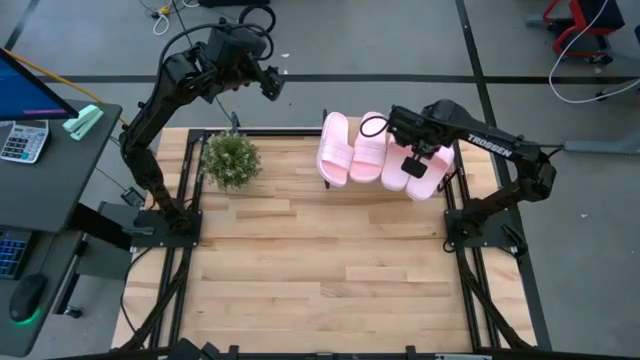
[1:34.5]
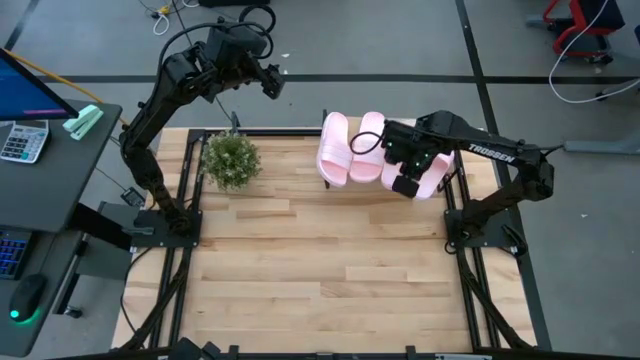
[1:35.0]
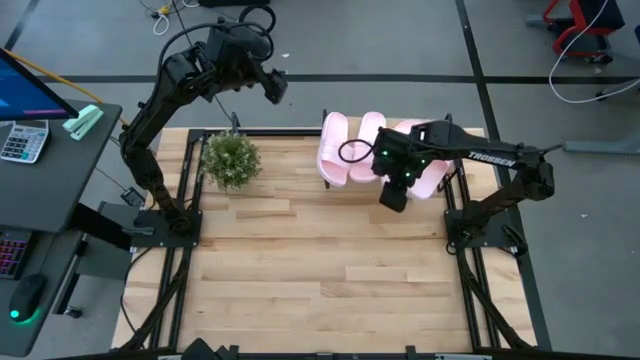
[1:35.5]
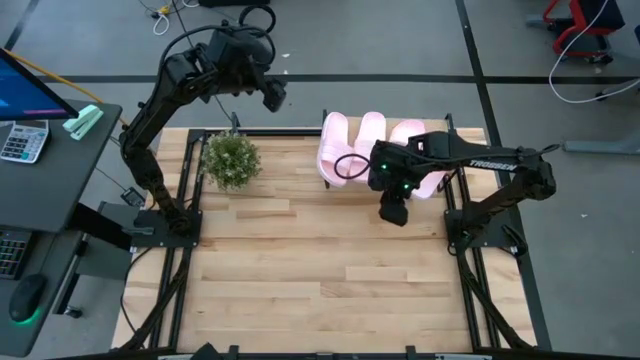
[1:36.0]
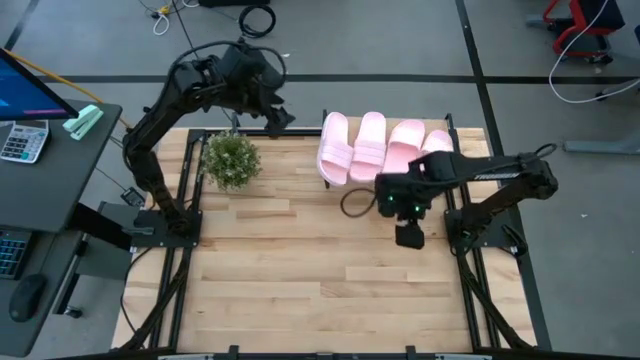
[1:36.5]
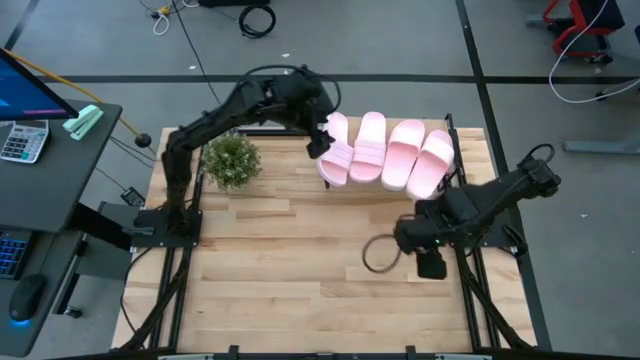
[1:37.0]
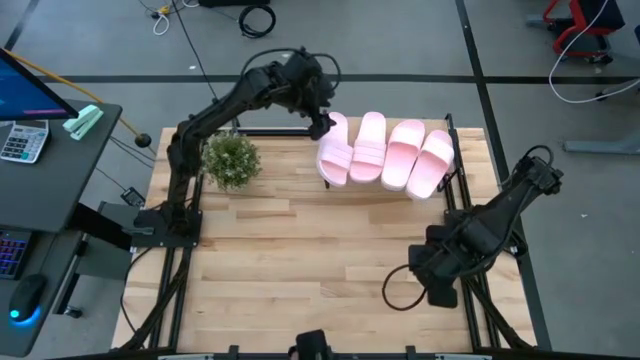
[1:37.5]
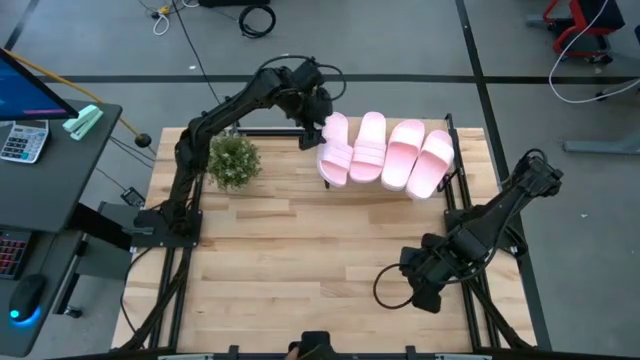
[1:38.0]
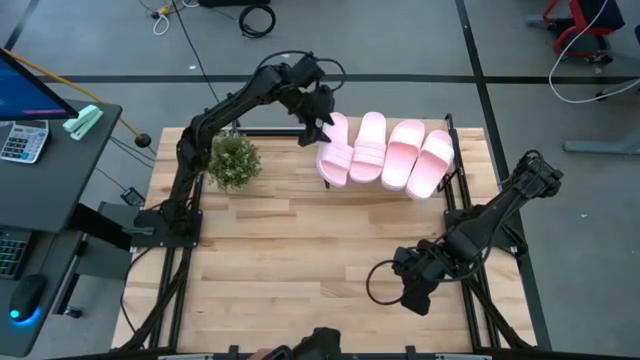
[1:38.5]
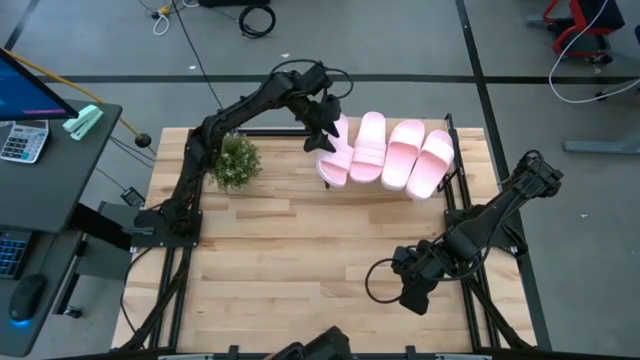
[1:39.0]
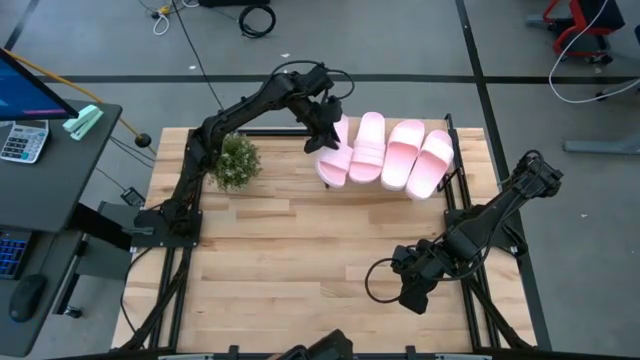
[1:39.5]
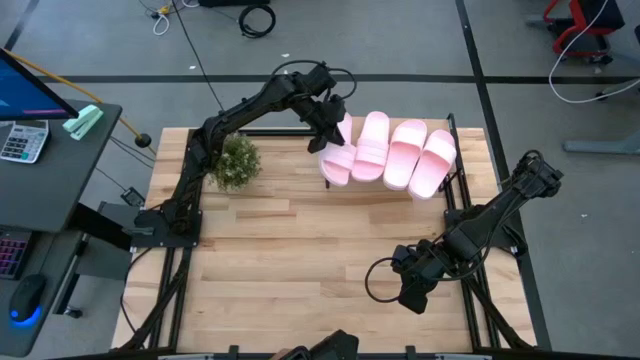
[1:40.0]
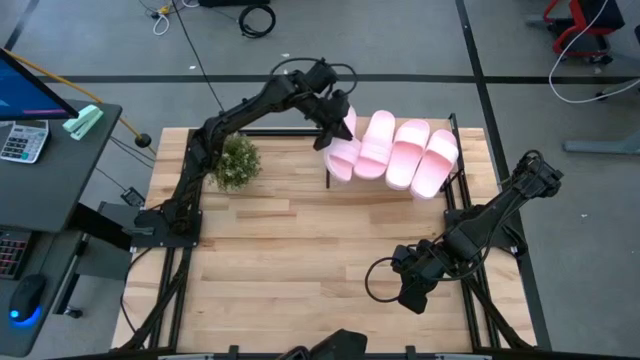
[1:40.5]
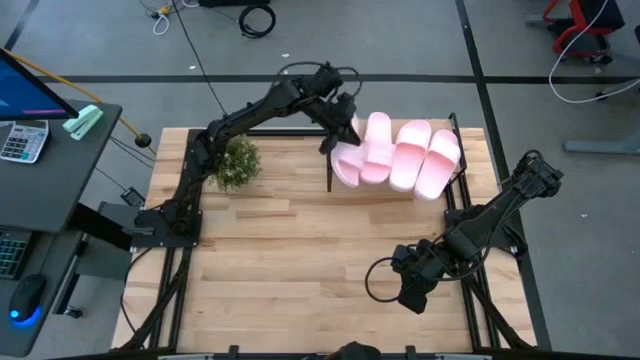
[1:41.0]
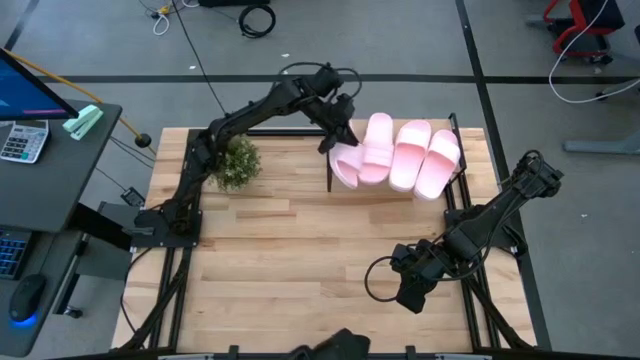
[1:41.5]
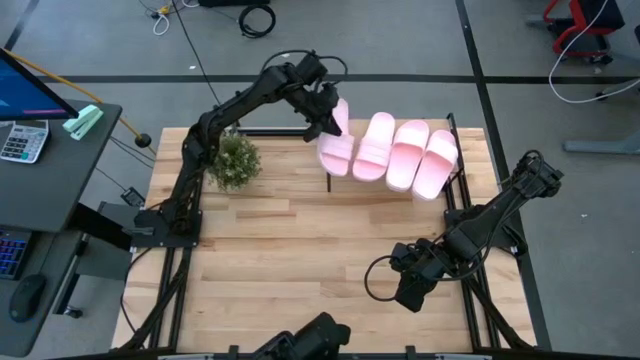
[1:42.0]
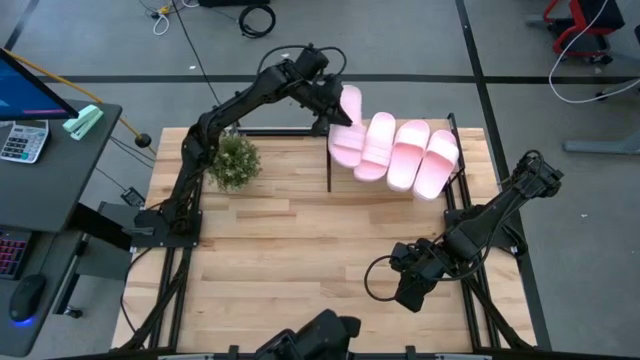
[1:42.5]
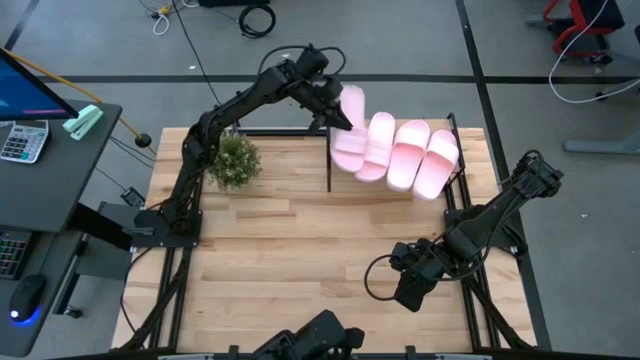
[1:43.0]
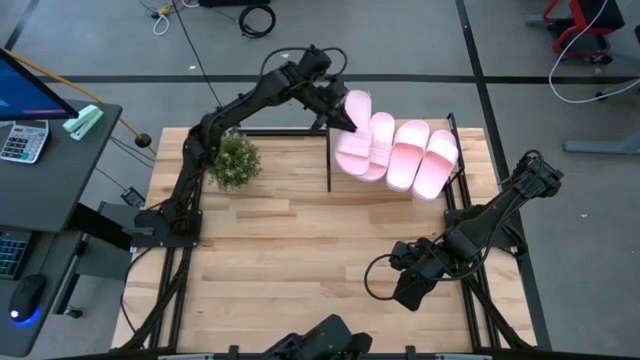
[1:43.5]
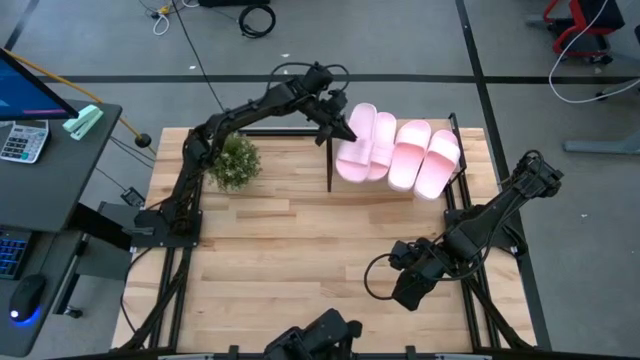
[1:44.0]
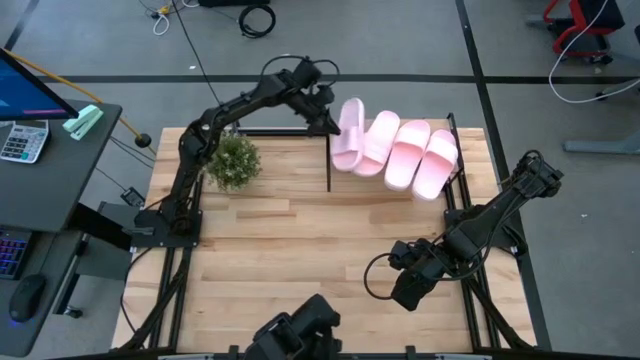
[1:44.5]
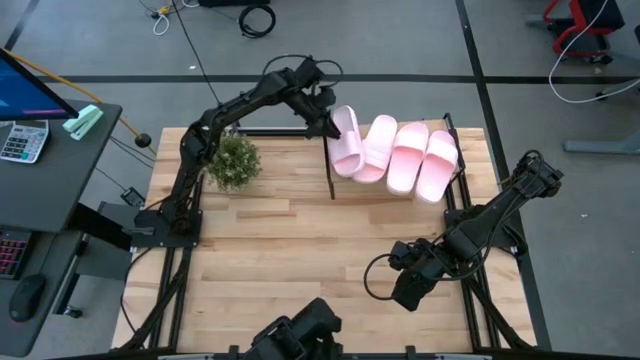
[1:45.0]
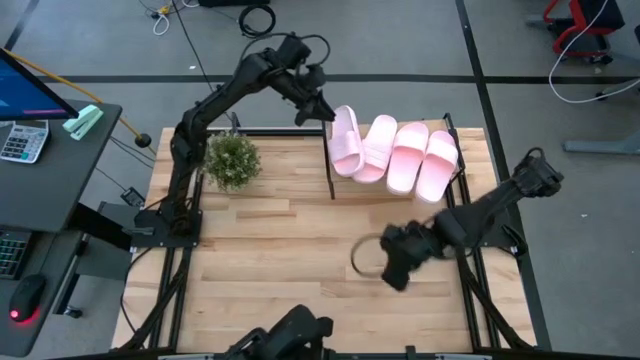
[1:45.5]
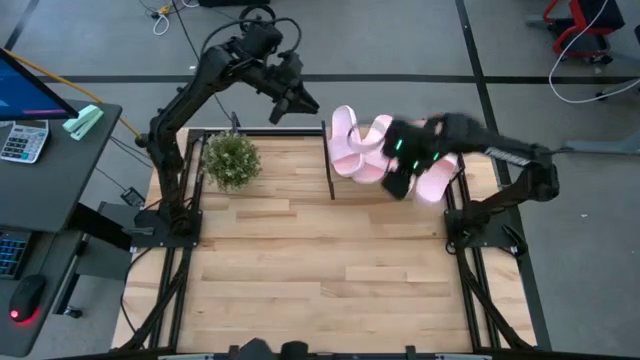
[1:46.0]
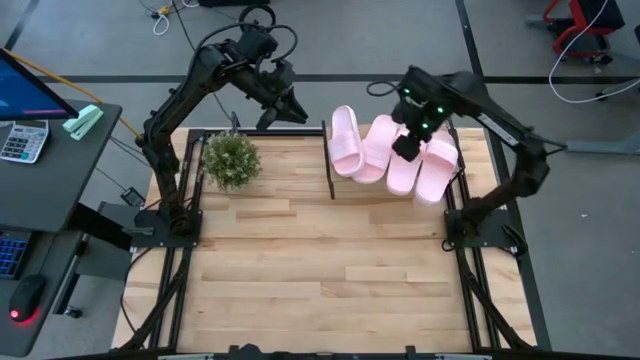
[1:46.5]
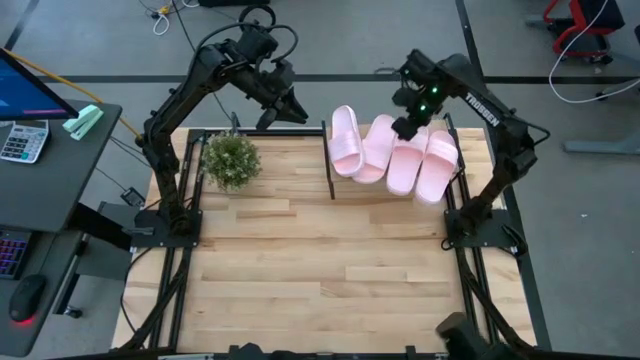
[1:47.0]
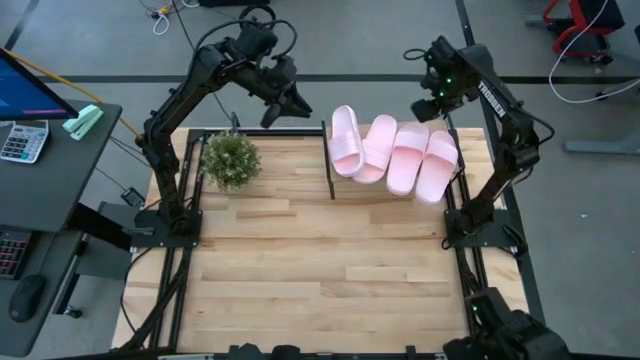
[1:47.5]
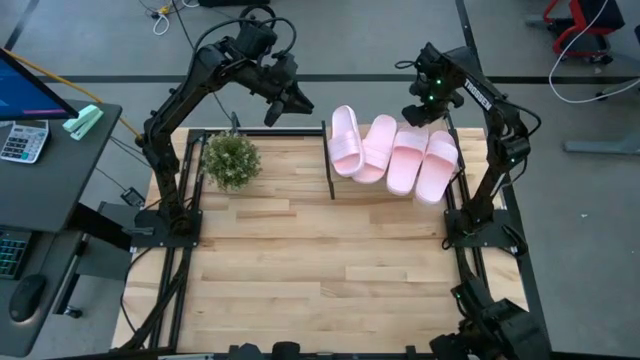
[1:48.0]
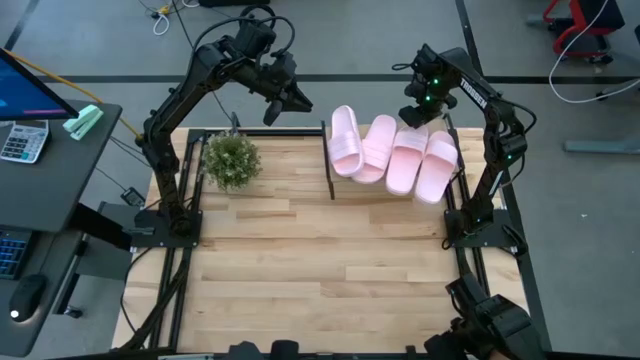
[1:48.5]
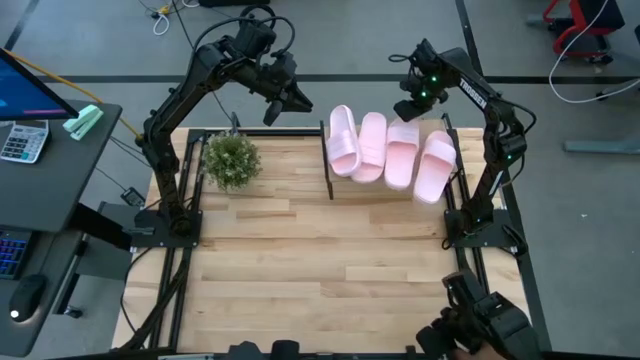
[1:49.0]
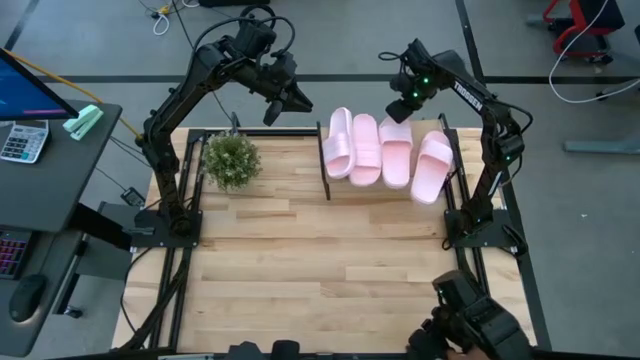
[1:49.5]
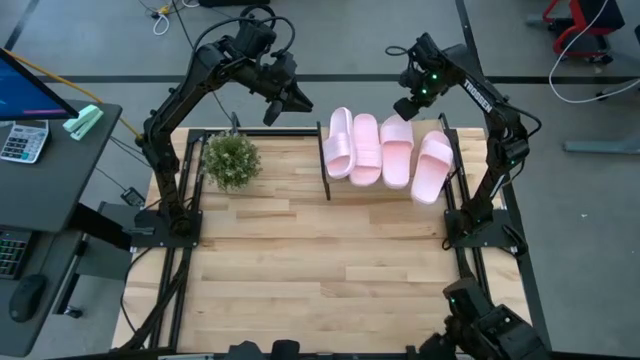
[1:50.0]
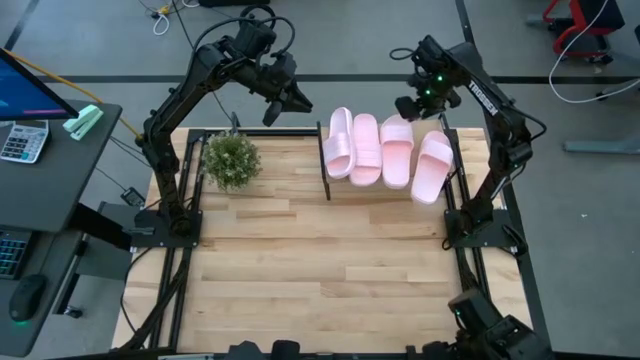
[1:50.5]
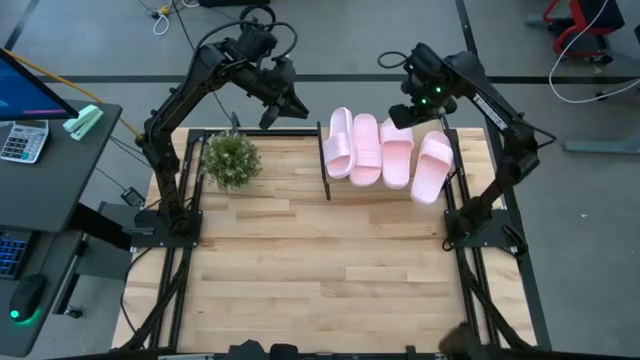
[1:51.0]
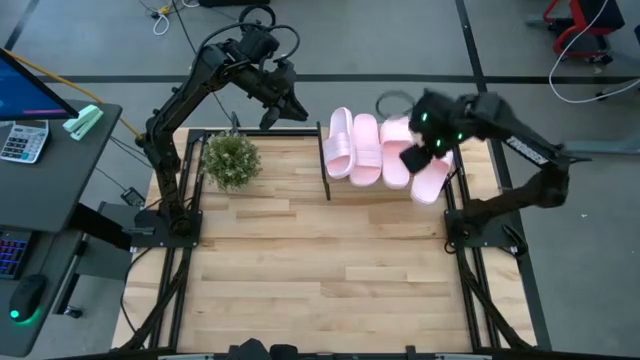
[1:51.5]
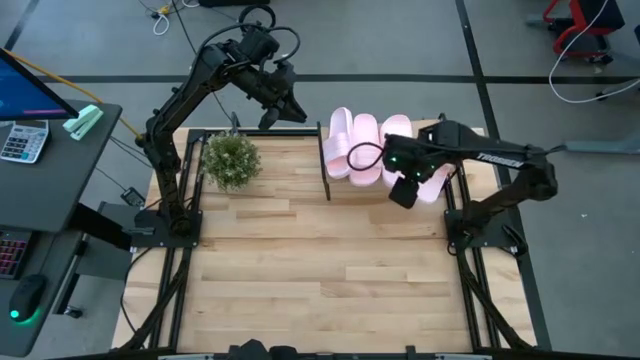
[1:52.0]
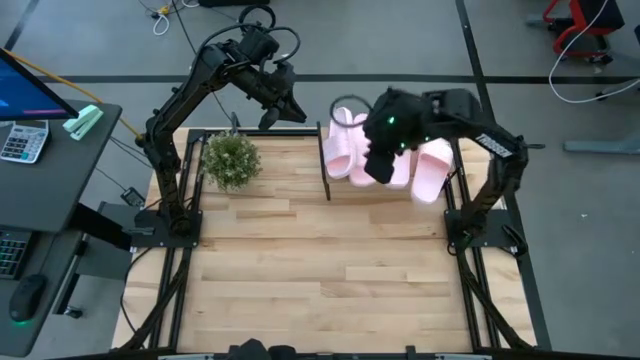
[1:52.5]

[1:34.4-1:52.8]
Task: Pick and place slides into the shelf
Adjust the slides on the shelf
